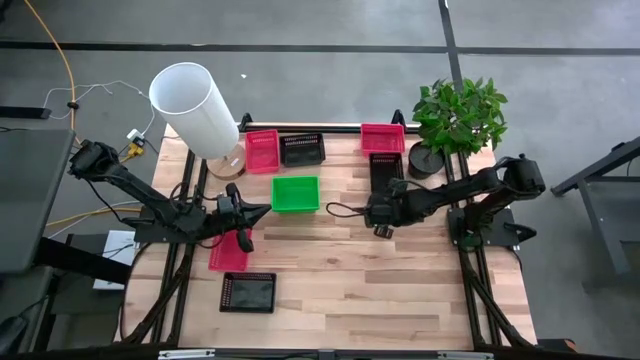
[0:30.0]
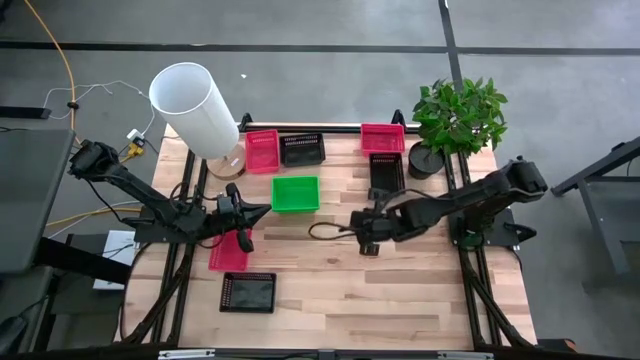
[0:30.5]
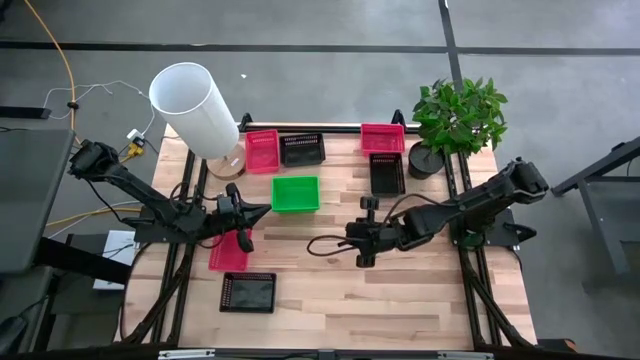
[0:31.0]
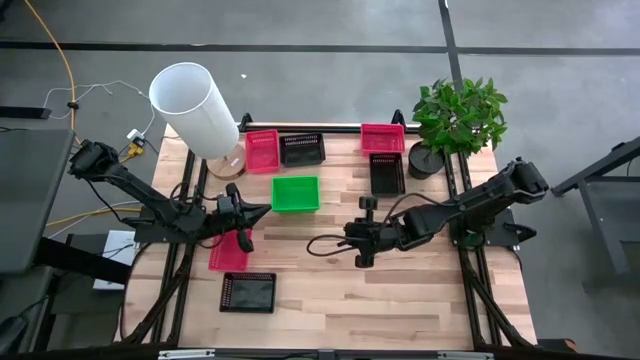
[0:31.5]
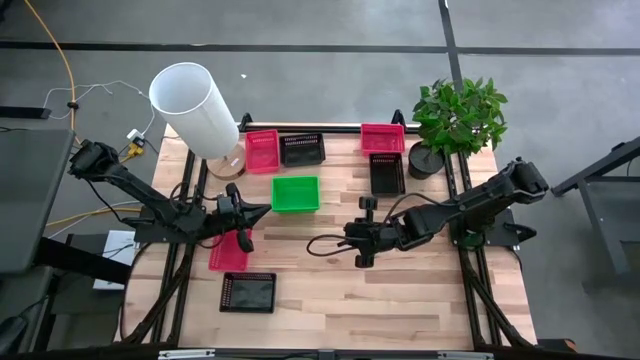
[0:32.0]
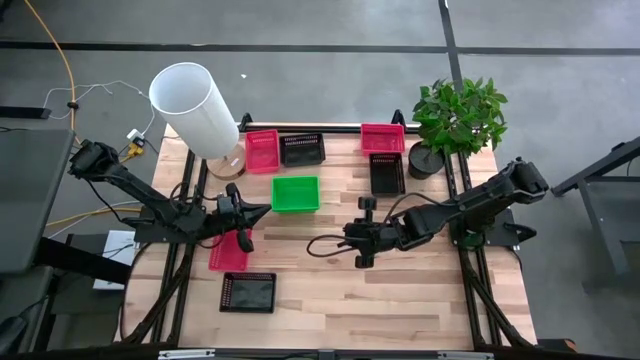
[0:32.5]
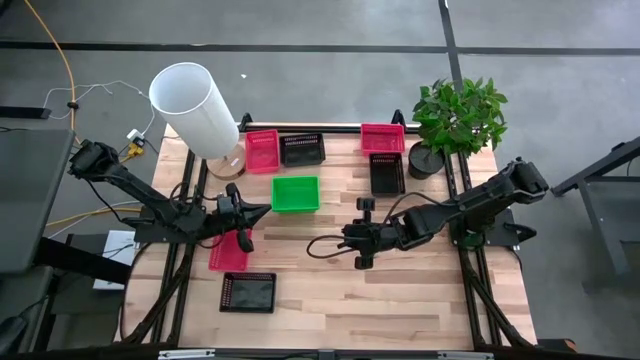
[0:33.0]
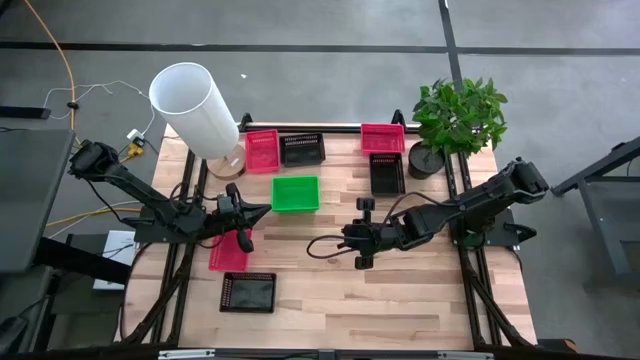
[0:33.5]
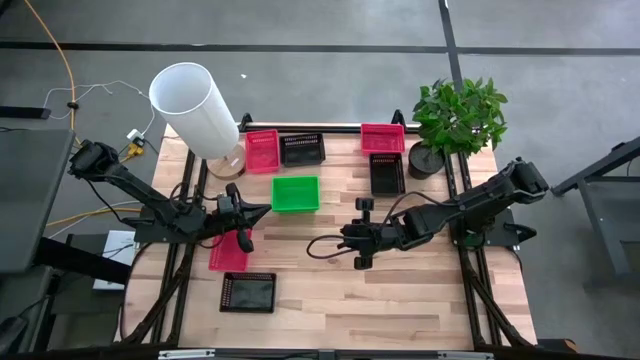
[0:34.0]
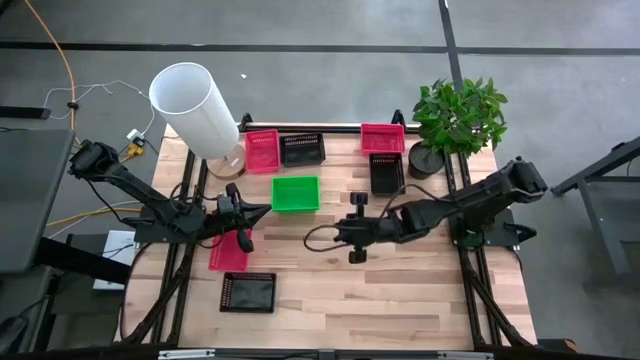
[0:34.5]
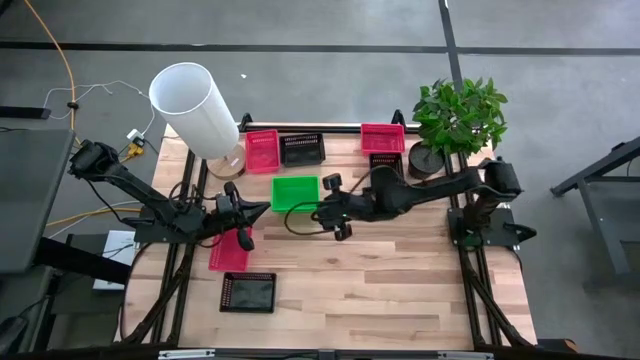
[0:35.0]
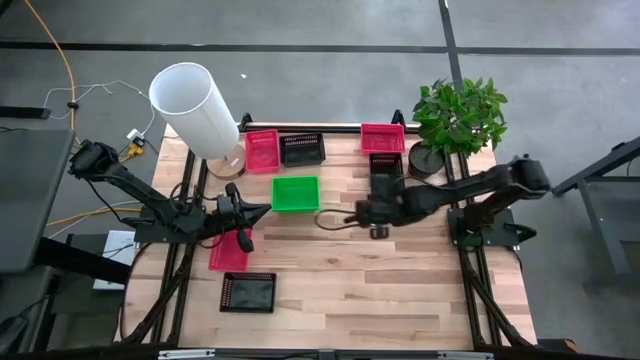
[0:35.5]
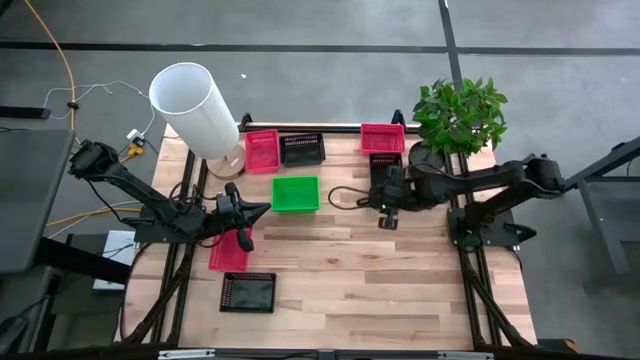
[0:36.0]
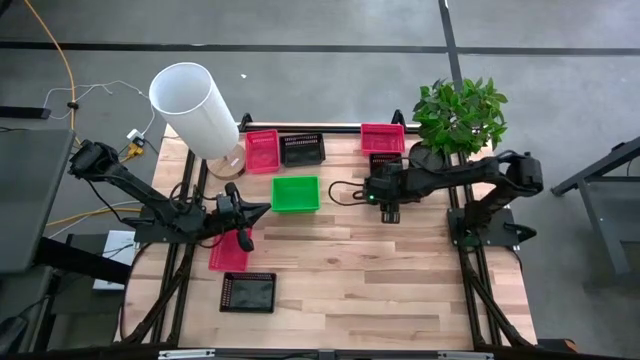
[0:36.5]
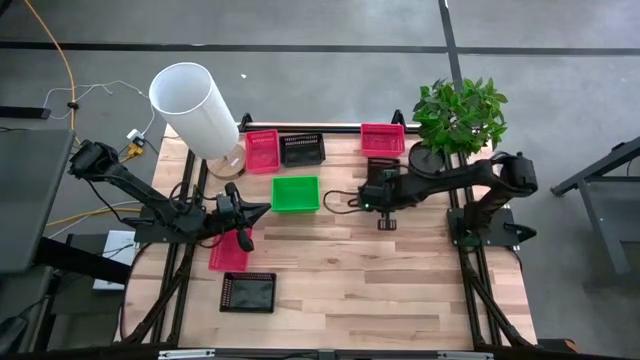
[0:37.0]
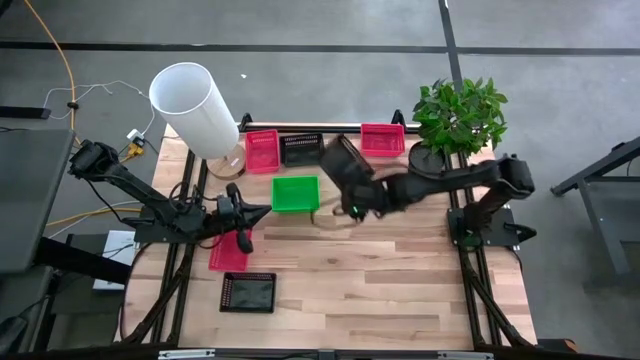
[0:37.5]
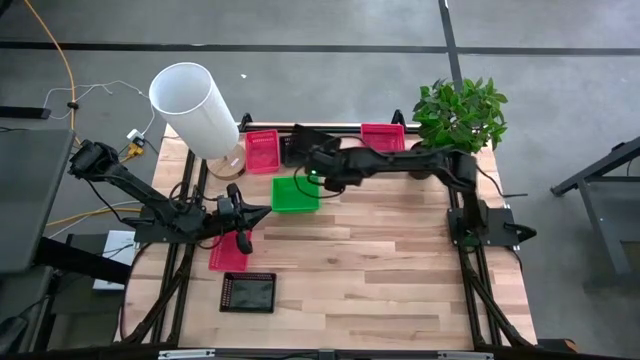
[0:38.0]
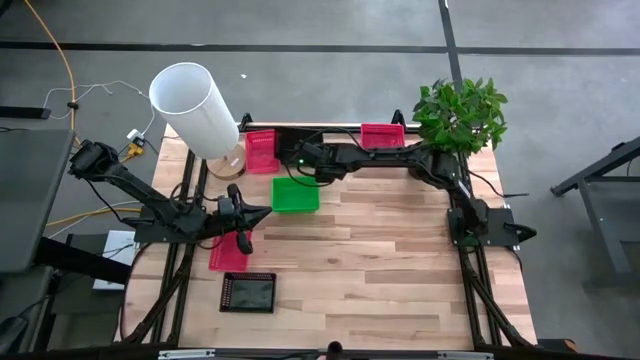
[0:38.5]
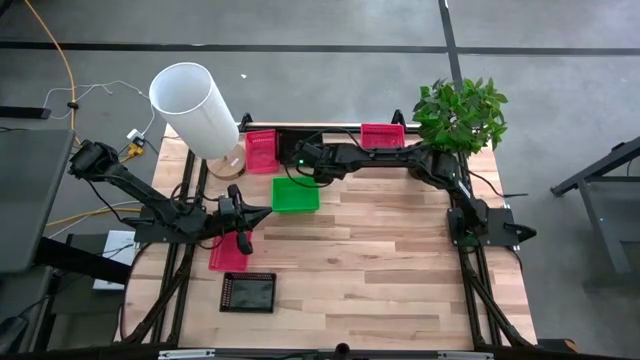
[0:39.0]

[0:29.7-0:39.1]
Stack the right top black basket on top of the left top black basket

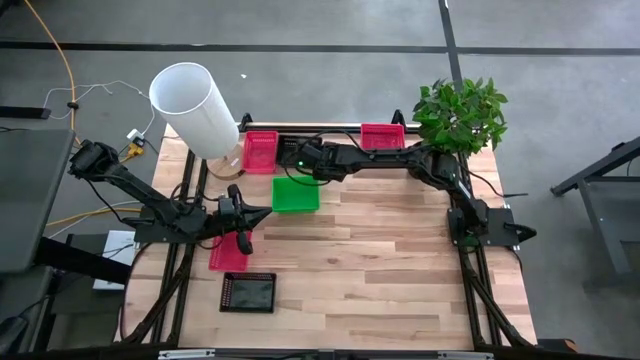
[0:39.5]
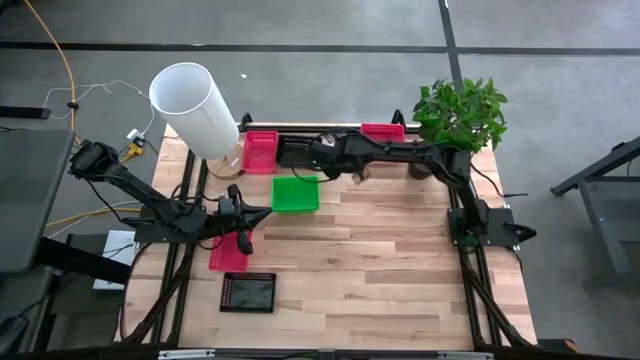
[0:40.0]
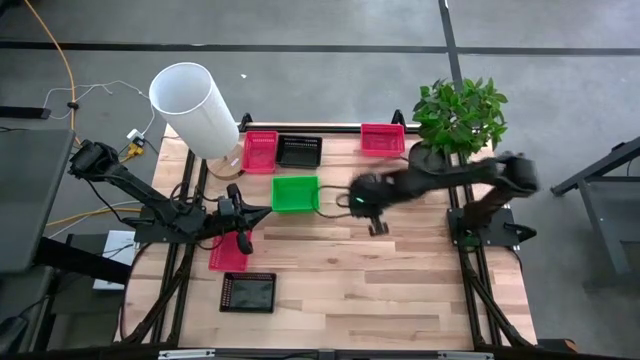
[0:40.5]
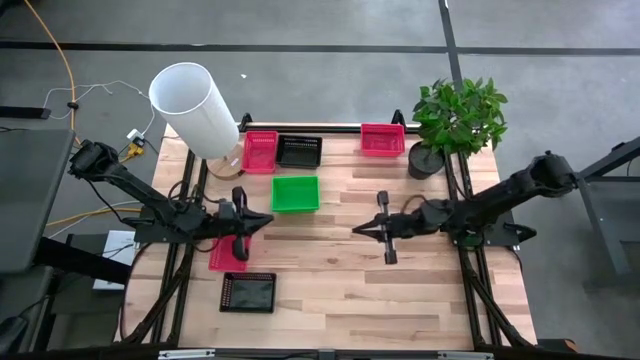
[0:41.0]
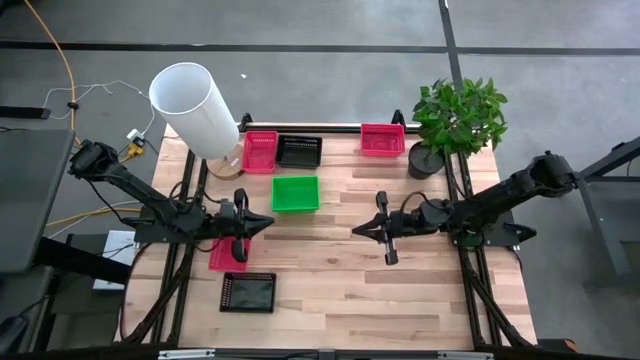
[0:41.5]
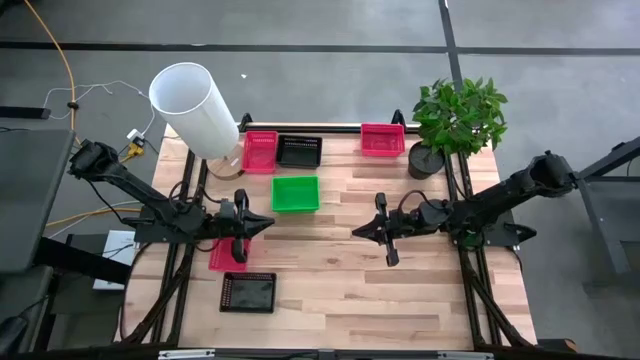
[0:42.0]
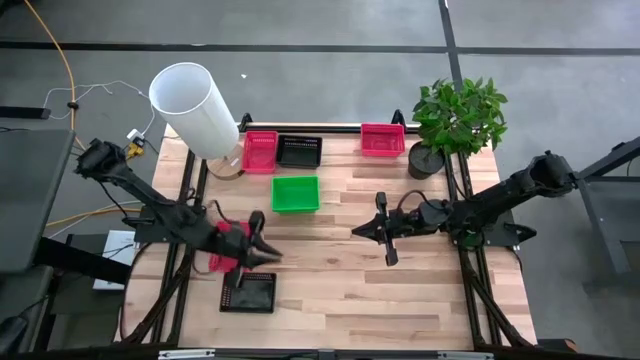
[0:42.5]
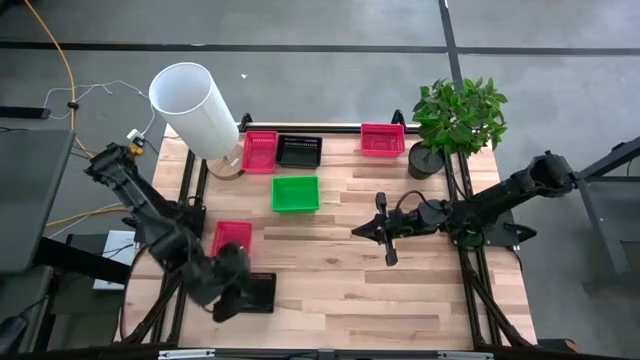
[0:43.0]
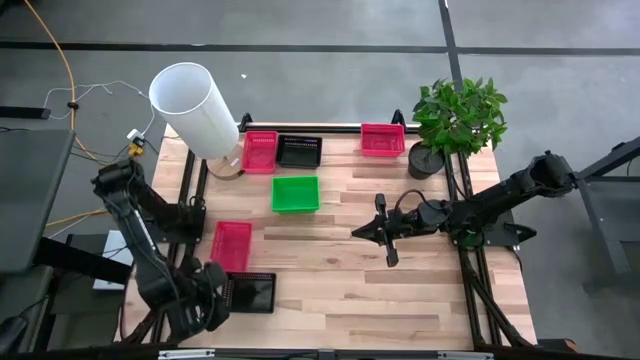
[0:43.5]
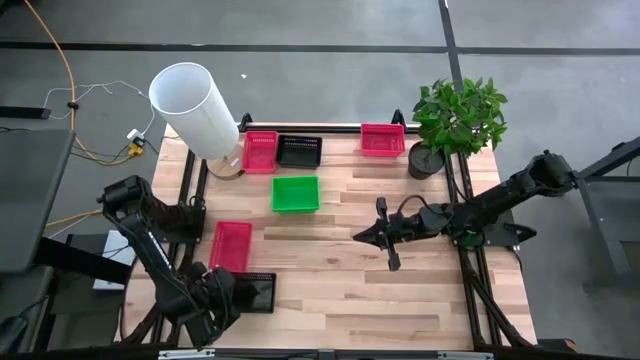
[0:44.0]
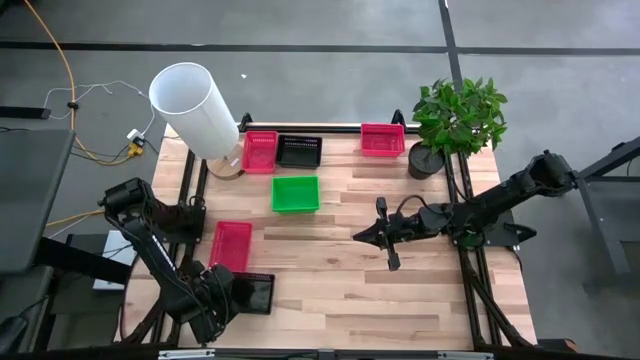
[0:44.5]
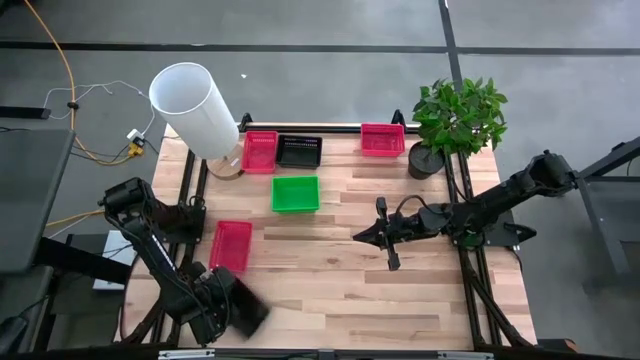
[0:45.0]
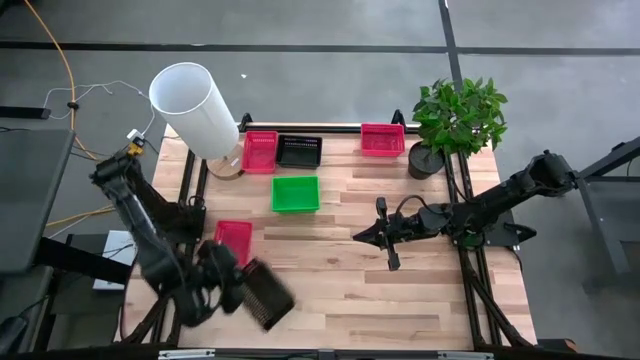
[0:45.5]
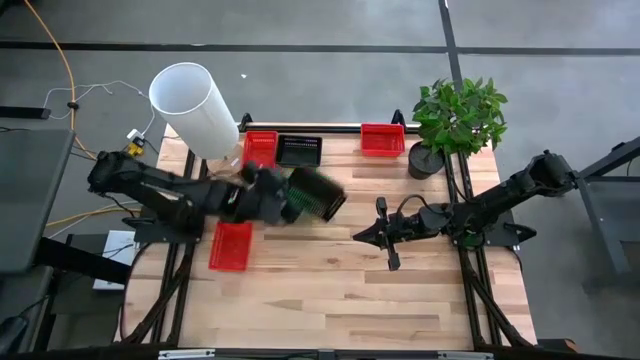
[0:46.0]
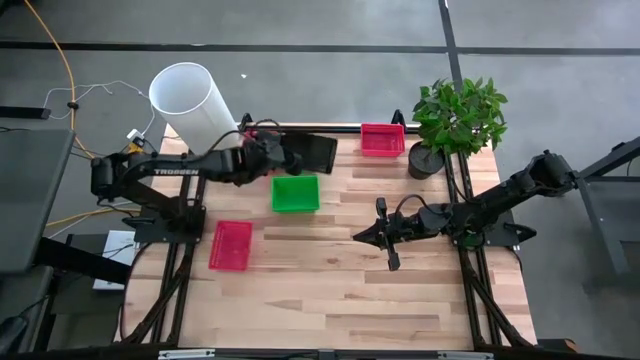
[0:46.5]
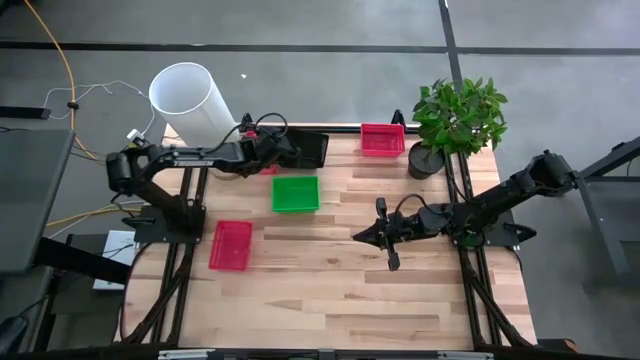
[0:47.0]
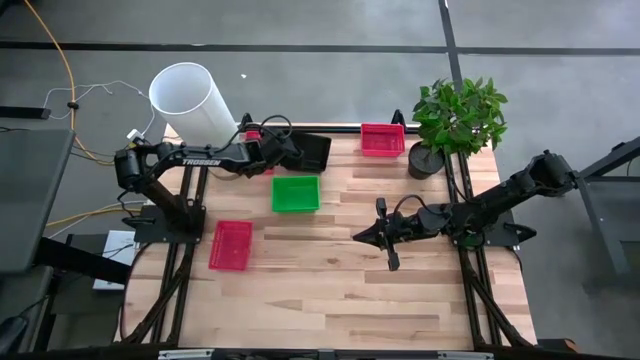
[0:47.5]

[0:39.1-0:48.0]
Stack the bottom black basket on top of the top black basket
